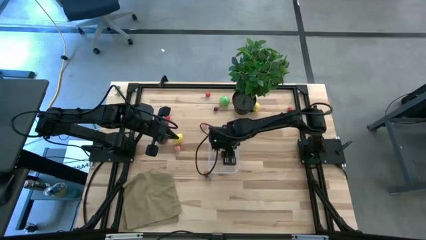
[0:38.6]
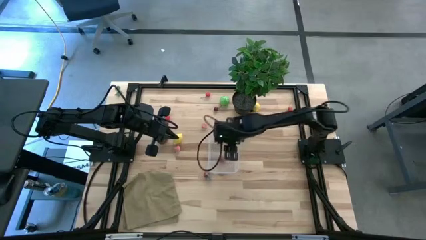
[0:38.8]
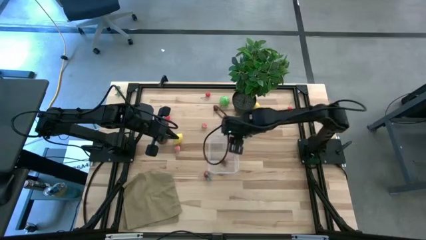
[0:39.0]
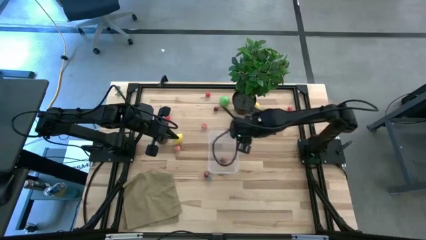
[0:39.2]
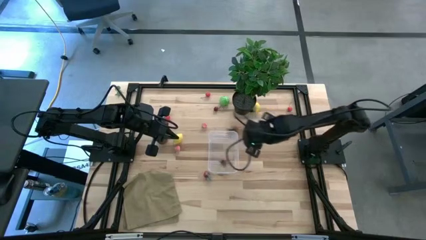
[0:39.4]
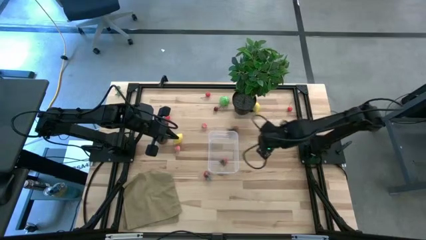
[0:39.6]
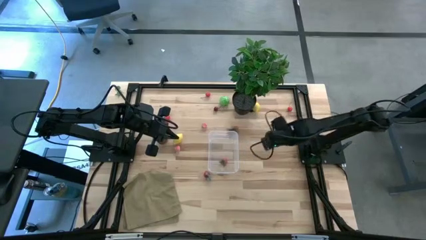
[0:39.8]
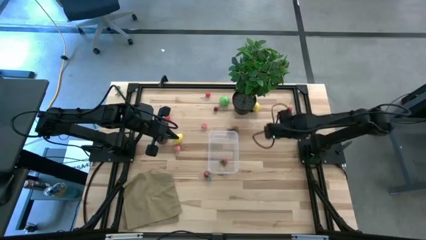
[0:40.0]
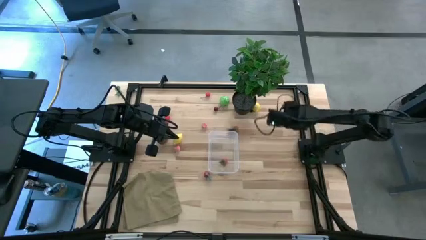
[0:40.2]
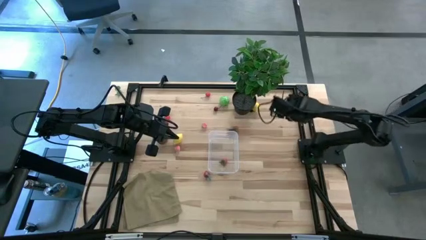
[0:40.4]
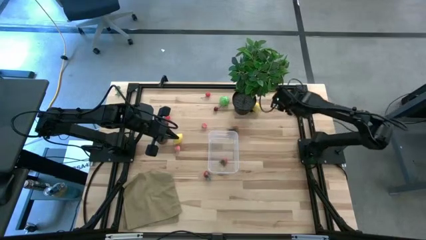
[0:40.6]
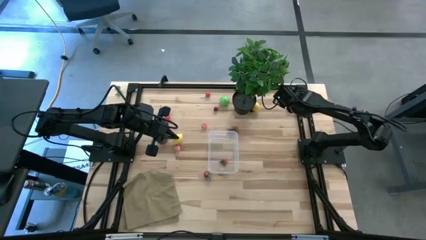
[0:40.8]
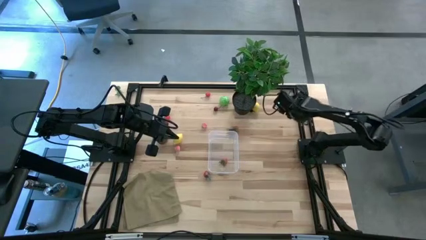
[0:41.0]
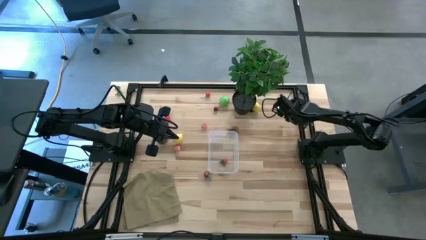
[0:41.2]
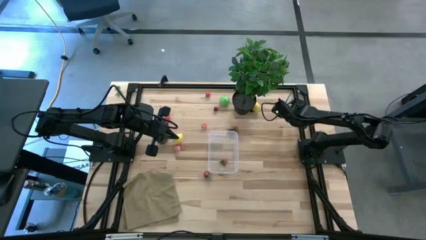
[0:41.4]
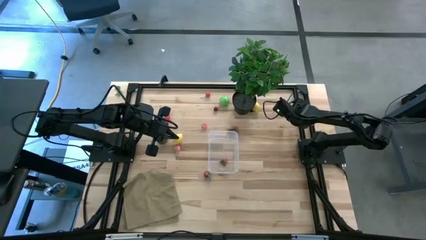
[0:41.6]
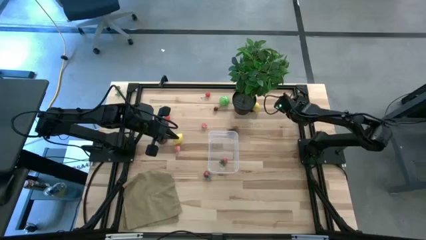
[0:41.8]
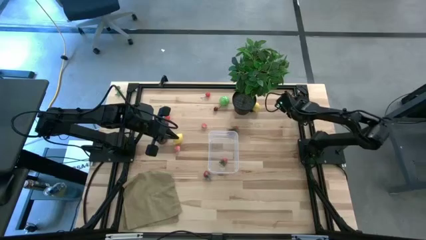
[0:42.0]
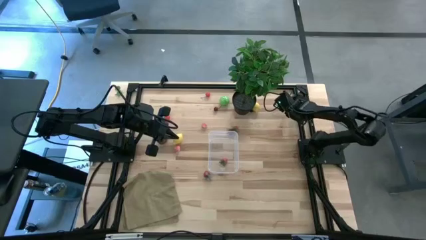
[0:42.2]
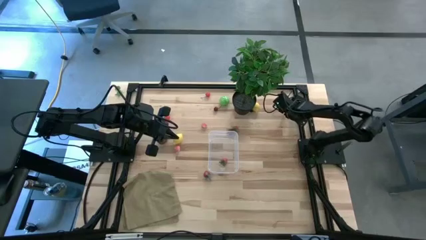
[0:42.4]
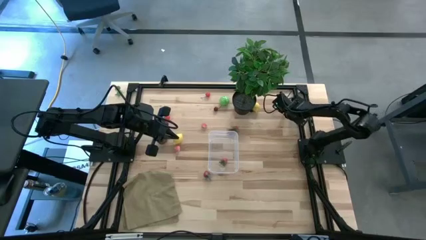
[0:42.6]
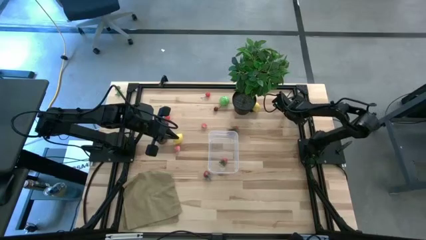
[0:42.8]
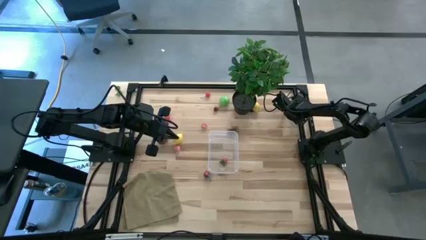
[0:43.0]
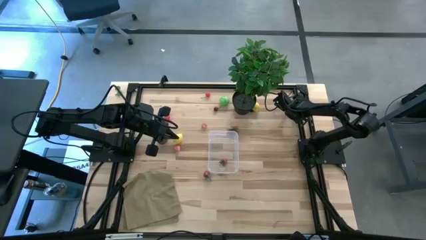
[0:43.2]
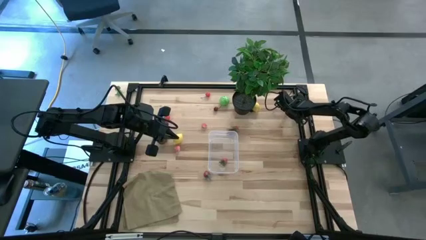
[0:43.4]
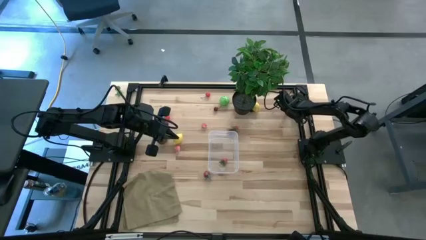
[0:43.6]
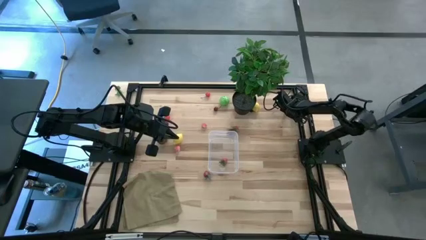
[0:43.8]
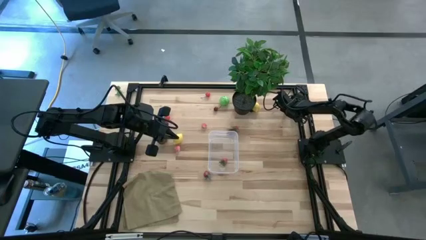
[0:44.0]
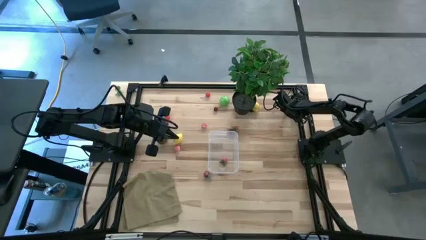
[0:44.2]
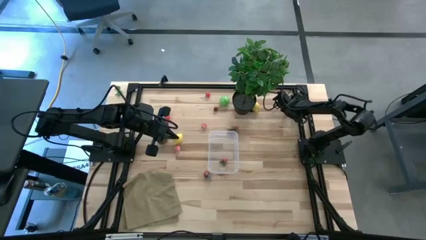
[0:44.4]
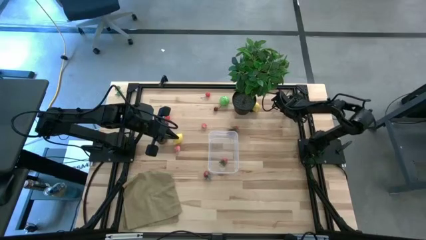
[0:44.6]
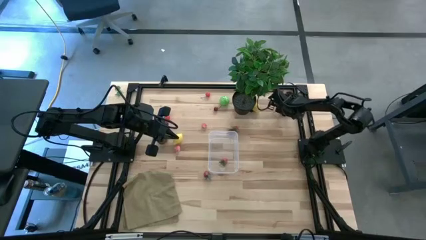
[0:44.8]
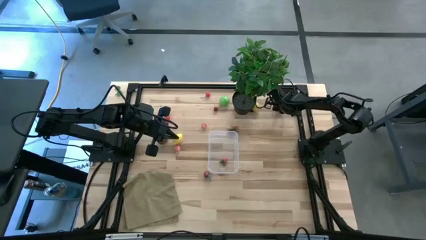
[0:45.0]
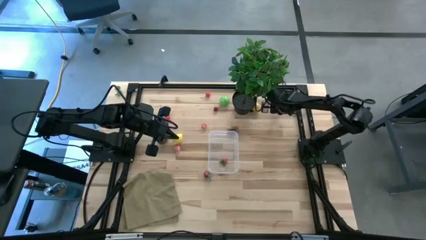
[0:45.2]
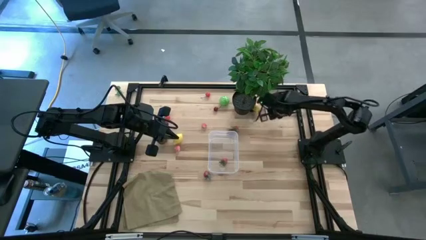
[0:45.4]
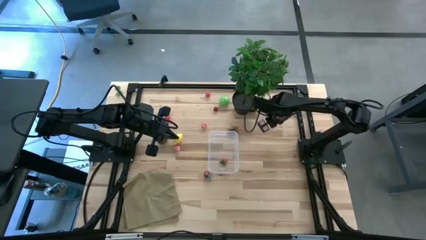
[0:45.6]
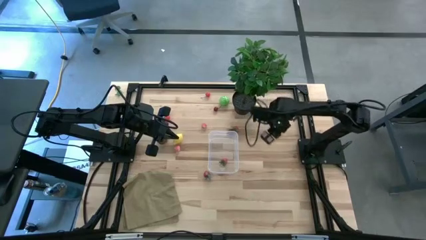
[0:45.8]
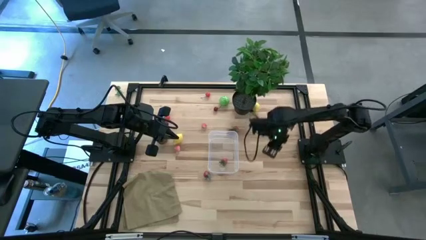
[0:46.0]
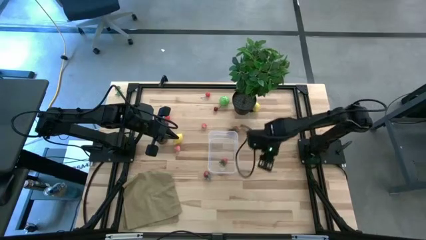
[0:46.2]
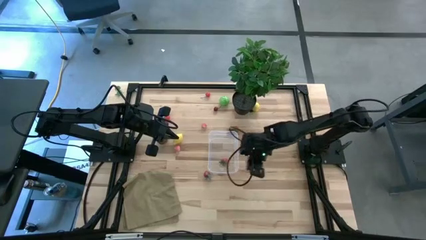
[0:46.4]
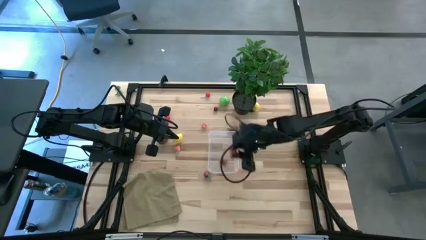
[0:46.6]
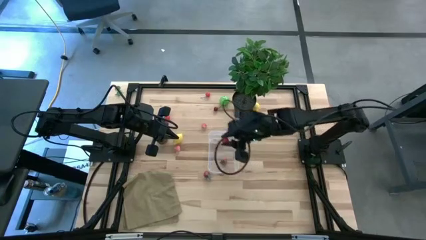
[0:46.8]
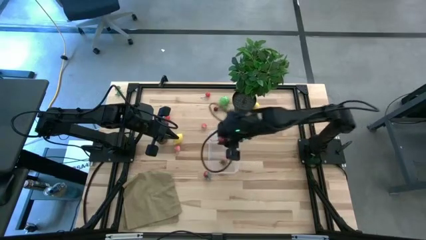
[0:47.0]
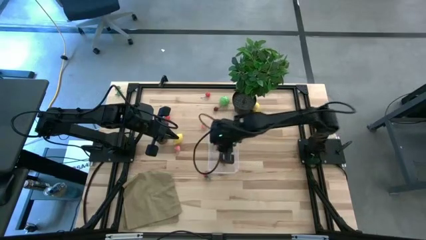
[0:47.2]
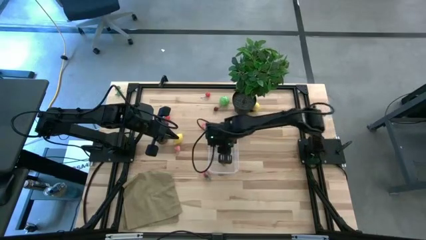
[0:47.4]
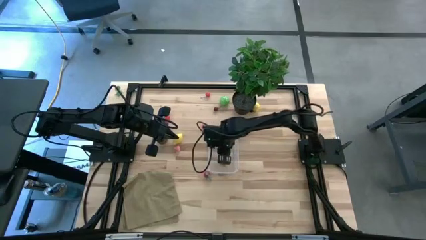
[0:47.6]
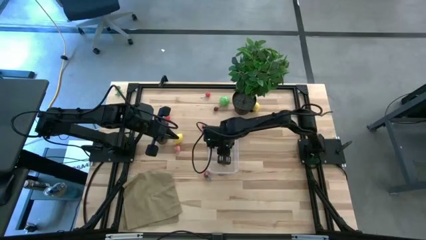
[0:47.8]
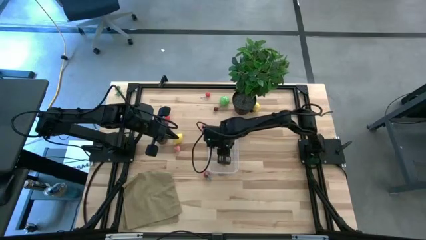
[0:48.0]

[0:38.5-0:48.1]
Task: Pick and placing Produce into tupperware
Put the red cherry into the transparent container
